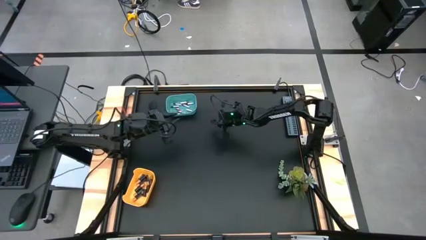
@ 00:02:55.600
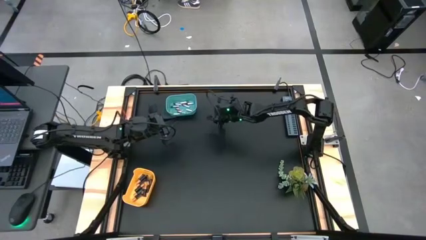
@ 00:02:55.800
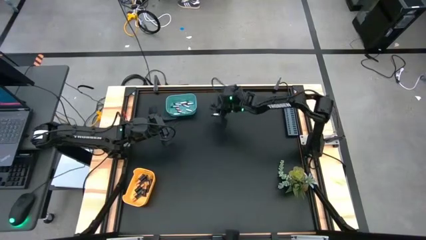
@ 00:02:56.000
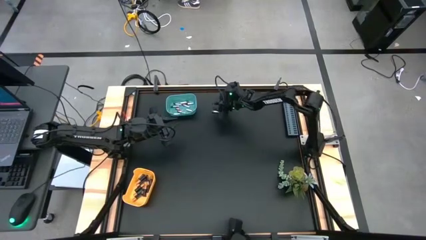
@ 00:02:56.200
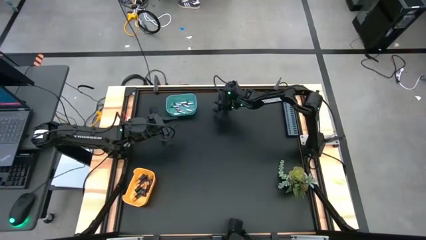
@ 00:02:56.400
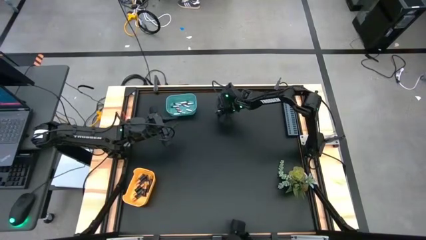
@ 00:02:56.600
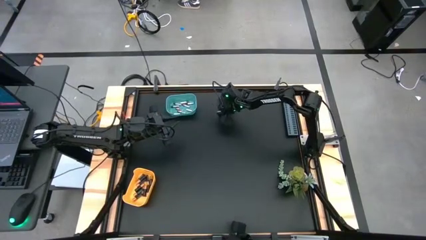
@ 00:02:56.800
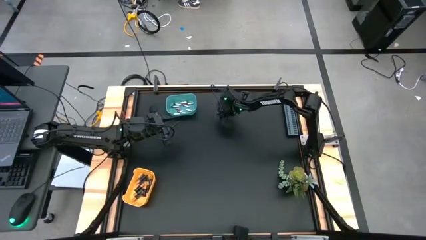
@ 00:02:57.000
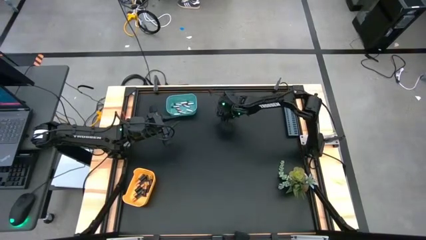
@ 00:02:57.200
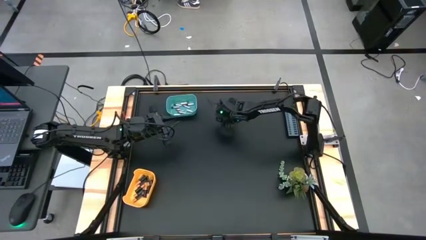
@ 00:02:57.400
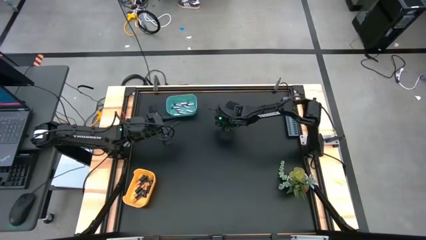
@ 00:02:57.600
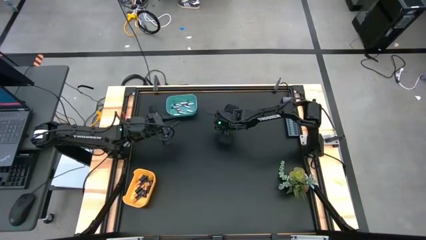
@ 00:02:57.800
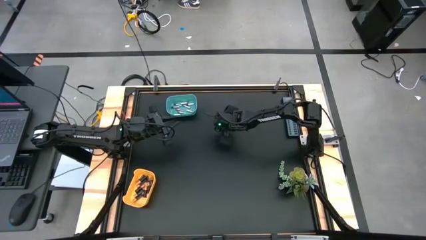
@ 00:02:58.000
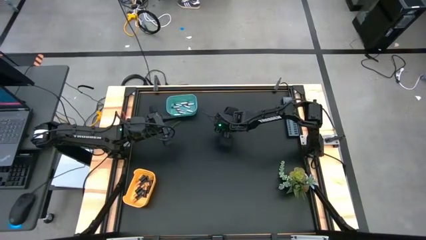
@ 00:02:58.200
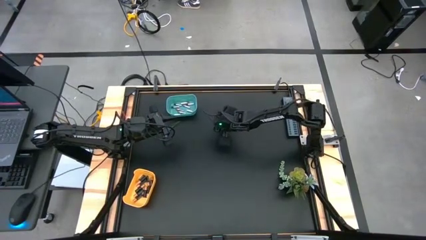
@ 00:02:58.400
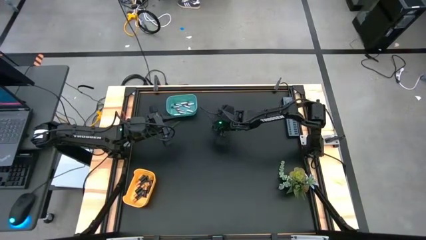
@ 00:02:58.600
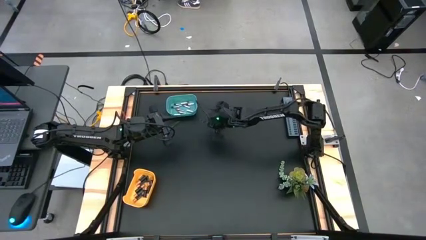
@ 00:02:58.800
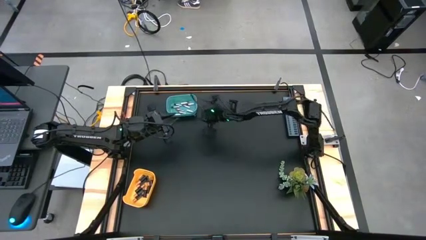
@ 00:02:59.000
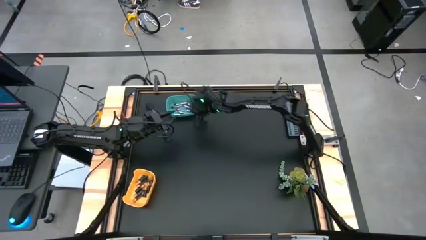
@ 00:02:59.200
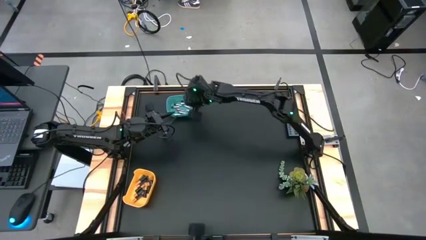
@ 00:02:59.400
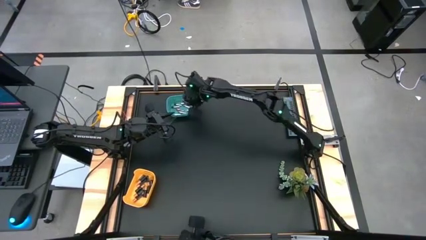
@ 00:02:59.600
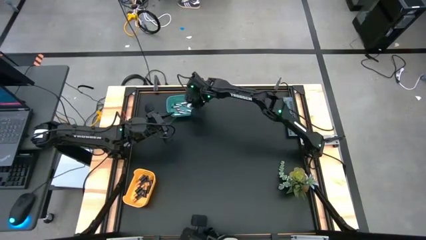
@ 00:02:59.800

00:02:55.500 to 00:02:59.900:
Task: Sort batteries
Put the silver battery into the green bin

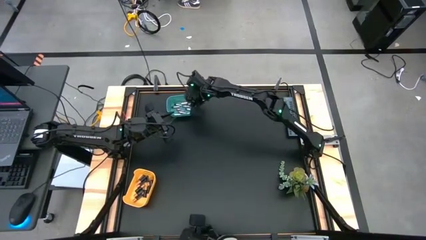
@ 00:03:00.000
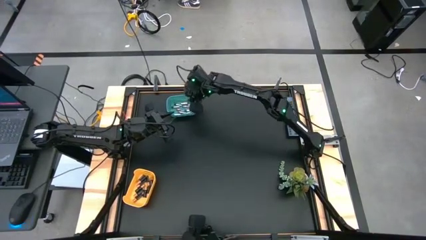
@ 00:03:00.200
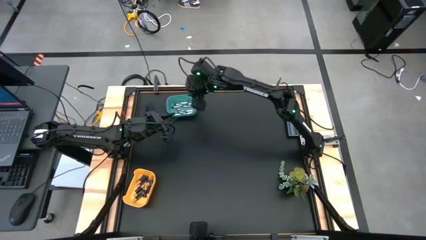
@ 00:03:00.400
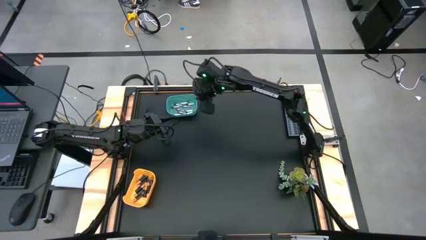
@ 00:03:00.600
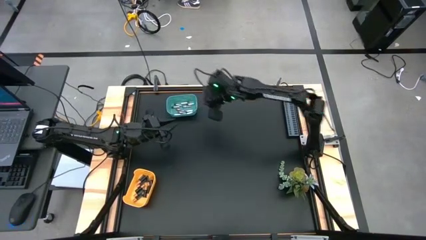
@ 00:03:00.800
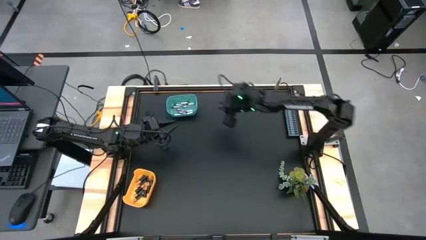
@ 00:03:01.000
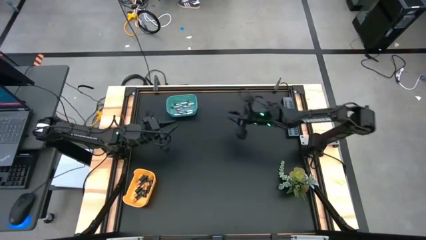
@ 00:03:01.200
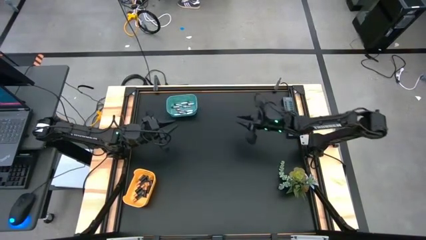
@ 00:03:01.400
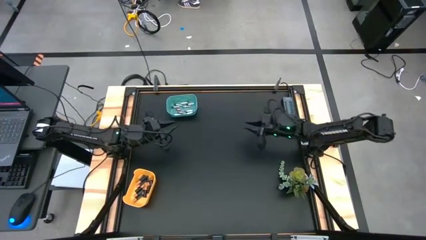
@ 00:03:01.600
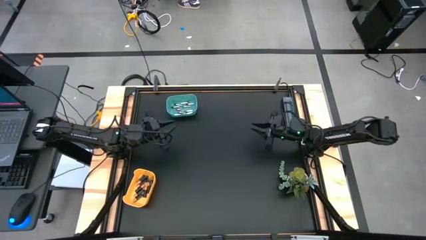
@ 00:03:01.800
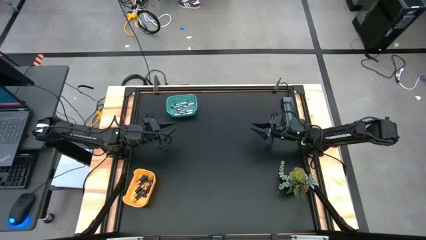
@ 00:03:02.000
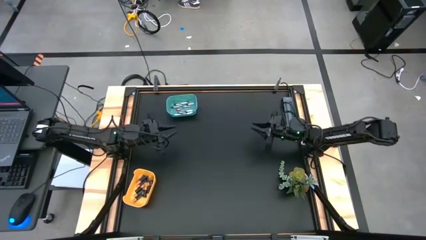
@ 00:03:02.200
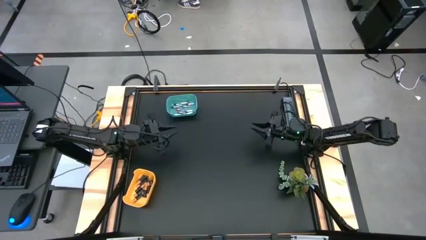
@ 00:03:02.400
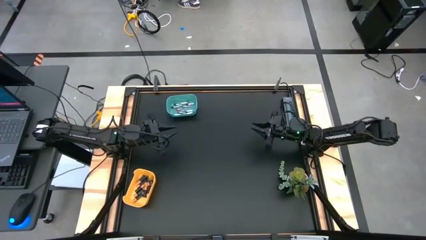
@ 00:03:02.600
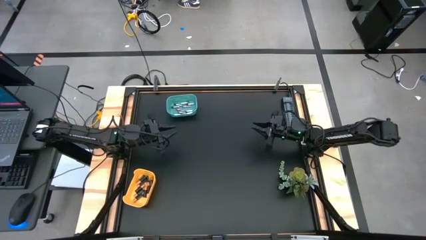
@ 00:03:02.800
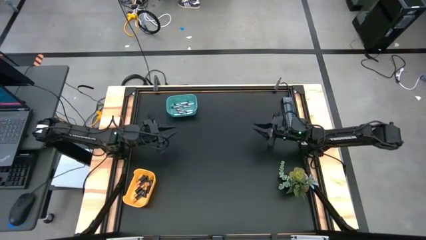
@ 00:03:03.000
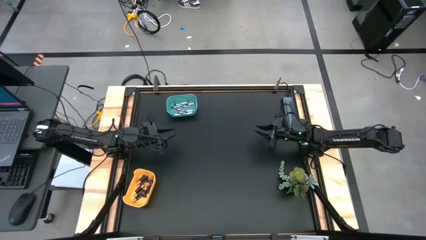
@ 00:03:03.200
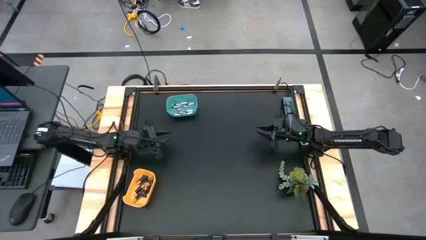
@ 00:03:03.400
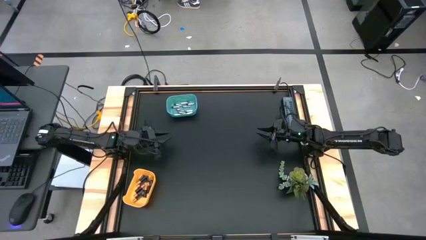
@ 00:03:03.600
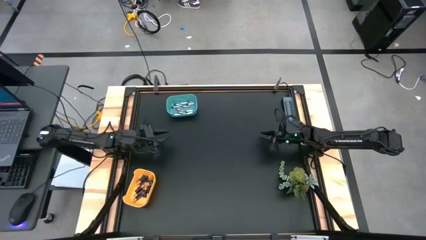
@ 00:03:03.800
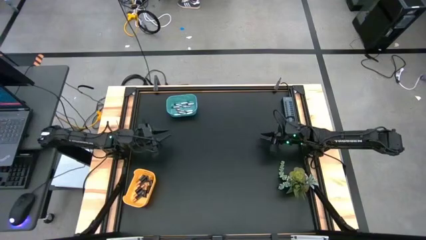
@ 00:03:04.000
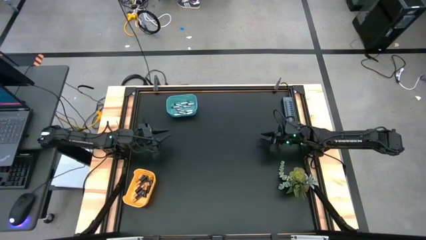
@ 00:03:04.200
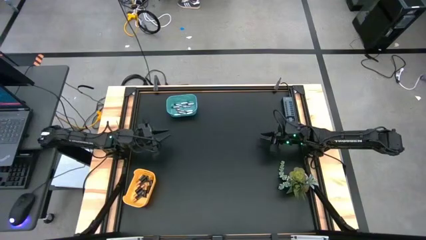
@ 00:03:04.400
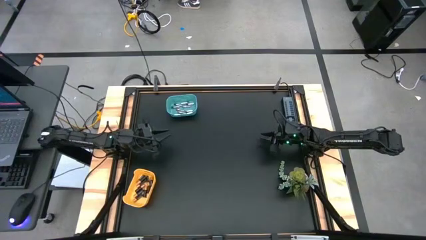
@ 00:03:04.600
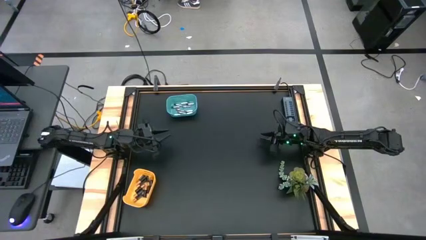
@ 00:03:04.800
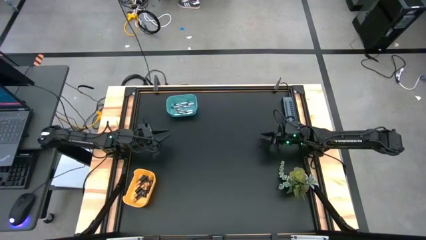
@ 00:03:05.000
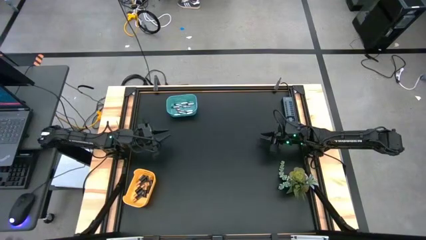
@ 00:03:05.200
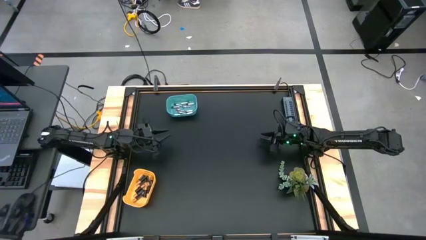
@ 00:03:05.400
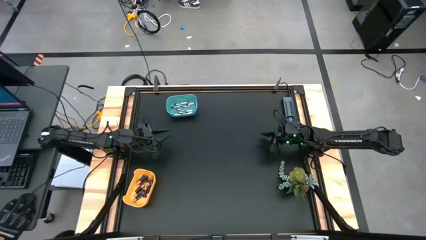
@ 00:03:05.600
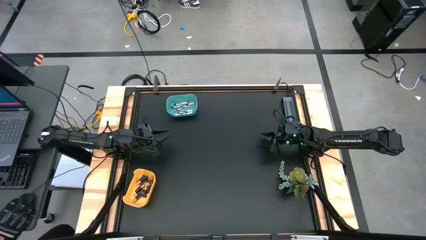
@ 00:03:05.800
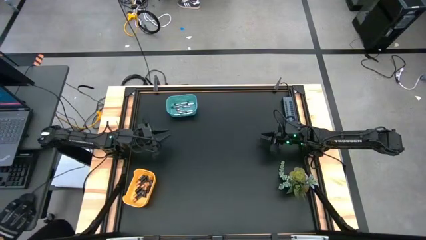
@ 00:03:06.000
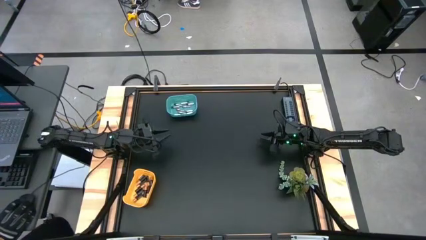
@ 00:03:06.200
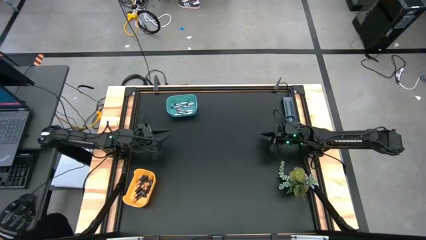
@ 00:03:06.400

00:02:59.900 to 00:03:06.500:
Return to Home Position

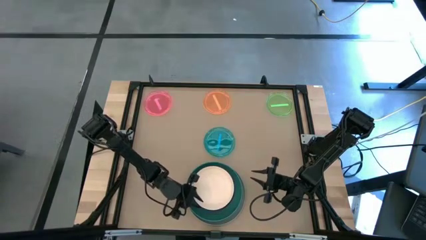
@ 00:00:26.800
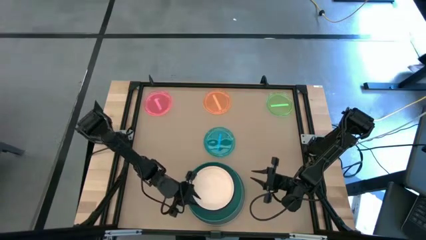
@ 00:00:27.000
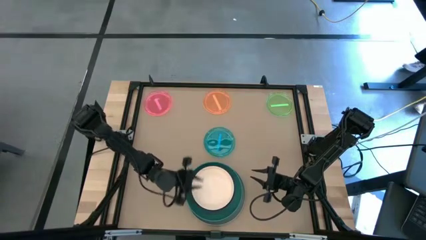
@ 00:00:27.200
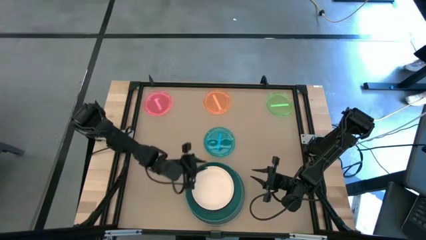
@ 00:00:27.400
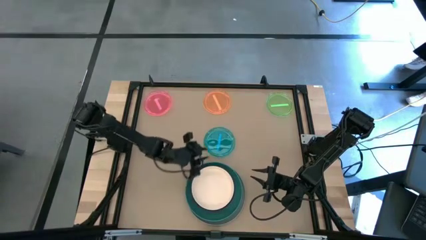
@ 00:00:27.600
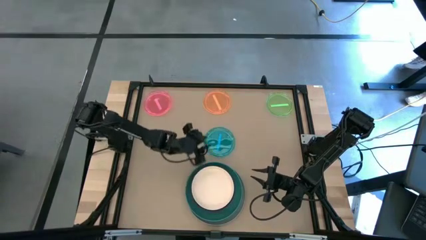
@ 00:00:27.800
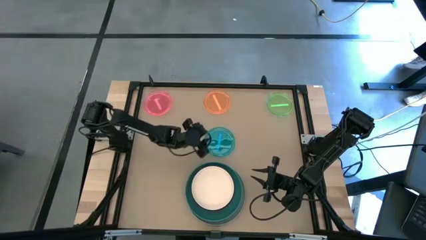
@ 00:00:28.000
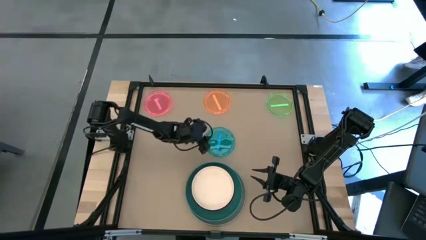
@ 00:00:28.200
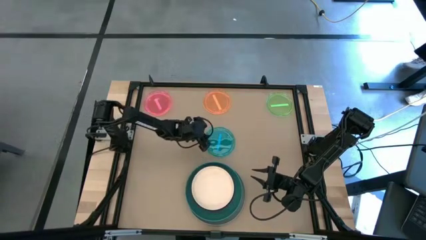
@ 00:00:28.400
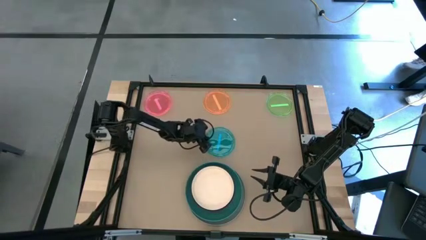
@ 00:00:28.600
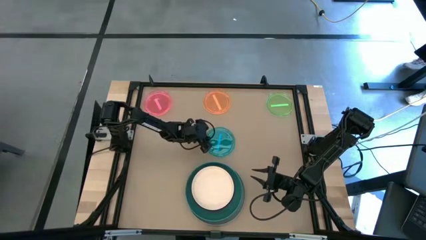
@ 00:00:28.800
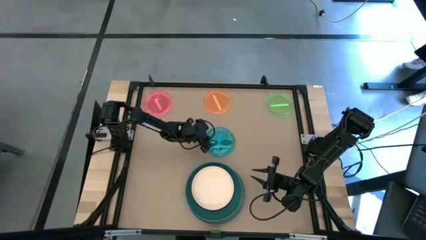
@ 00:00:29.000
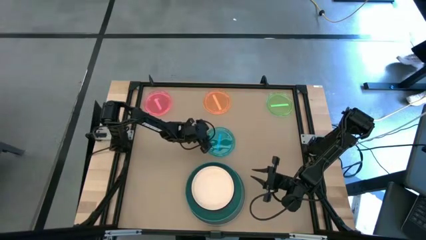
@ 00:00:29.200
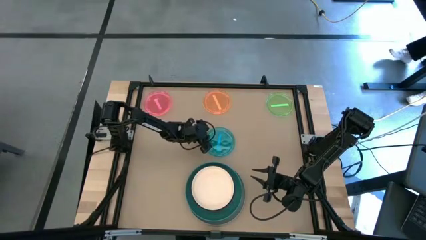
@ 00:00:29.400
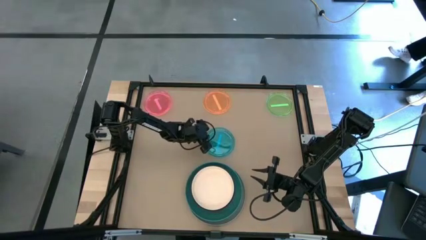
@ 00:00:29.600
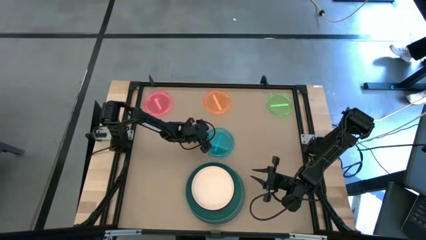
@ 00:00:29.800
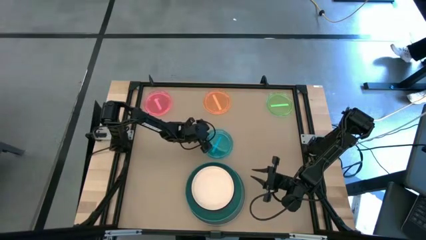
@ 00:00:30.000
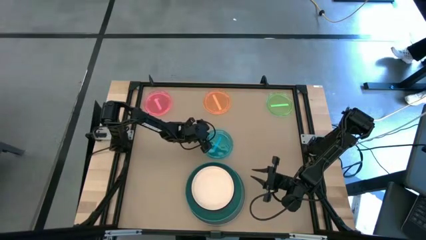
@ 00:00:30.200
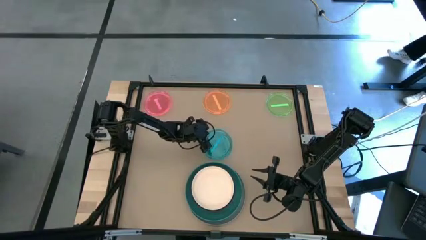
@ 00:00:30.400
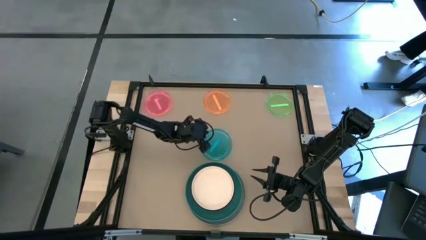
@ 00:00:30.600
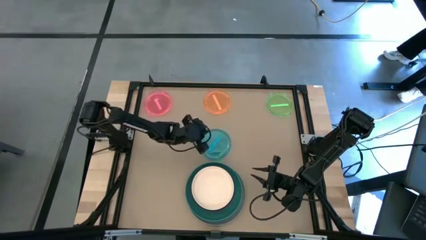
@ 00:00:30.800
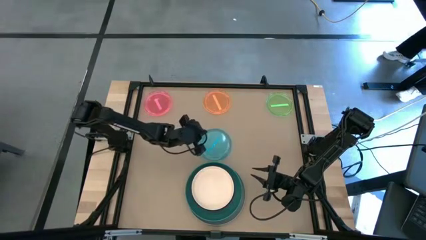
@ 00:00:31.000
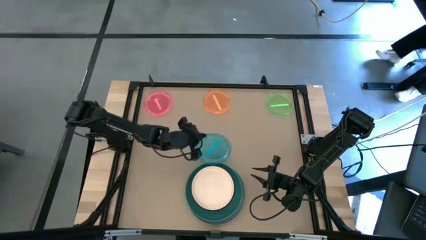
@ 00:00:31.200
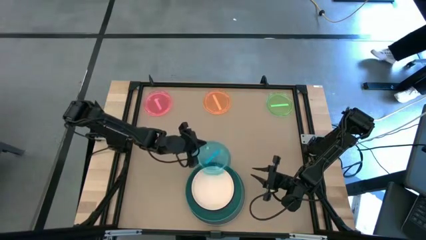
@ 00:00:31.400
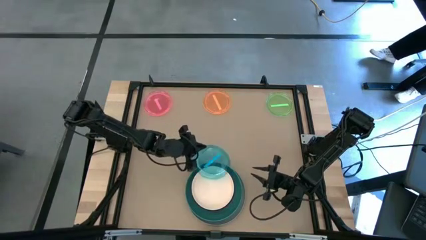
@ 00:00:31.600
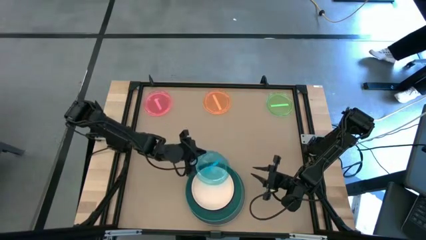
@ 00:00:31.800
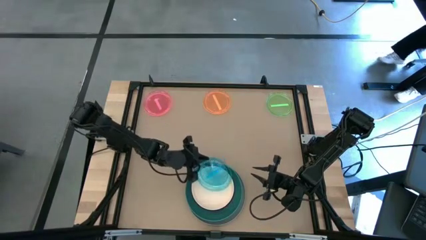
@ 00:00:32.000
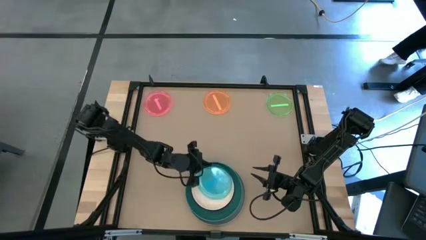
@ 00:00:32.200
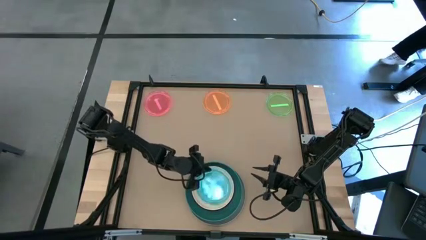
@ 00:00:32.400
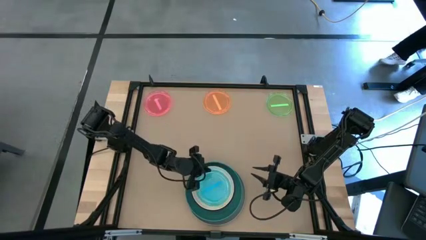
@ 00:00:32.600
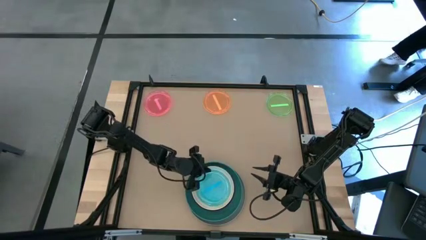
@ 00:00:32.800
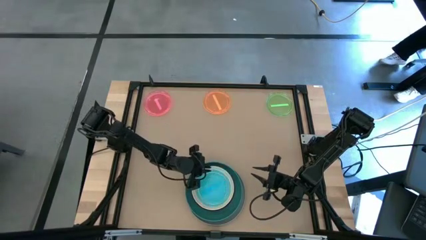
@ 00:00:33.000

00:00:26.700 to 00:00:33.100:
Task: Stack plastic plates
Stack the blue transparent plate on top of the white plate
